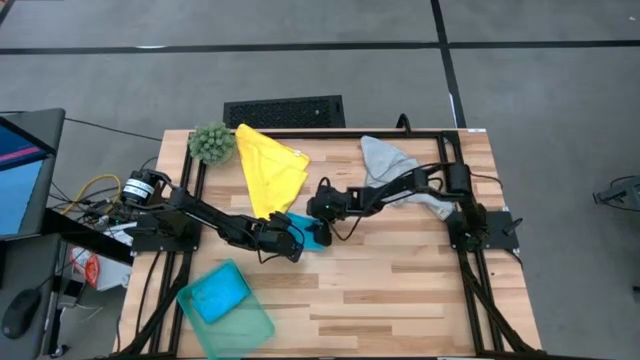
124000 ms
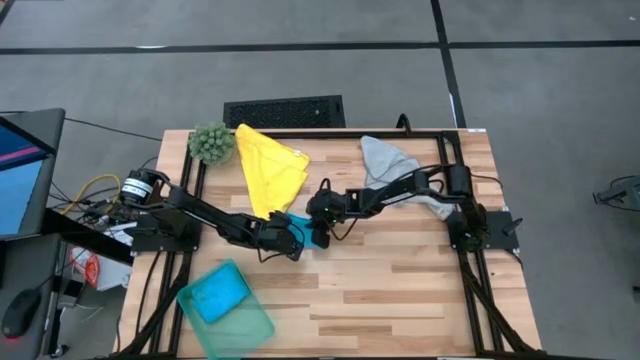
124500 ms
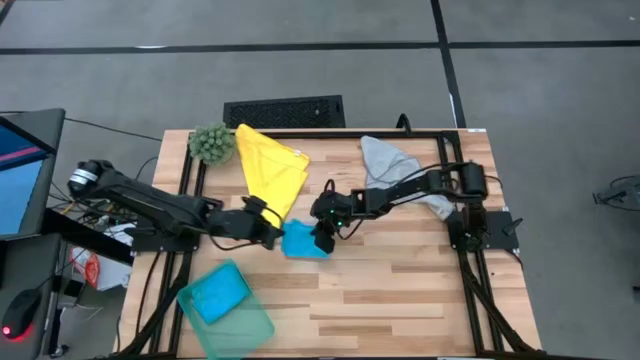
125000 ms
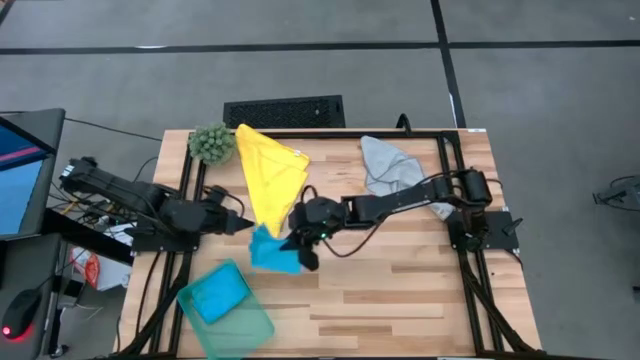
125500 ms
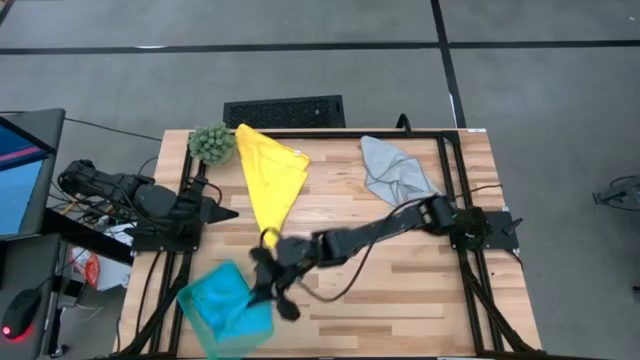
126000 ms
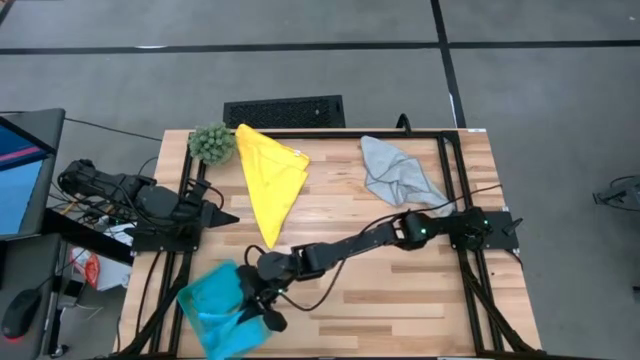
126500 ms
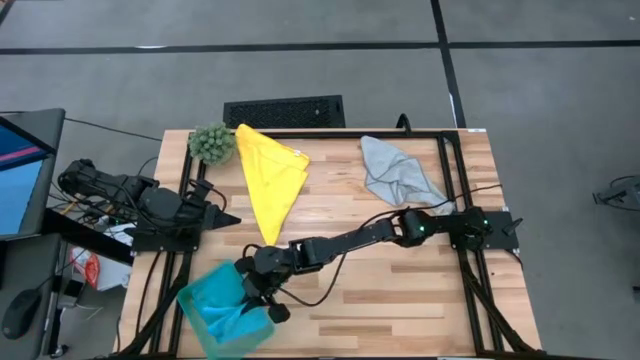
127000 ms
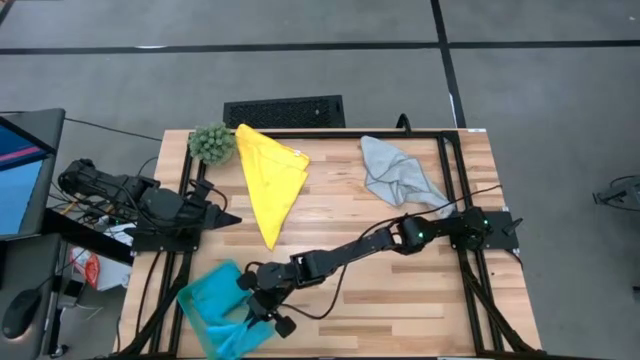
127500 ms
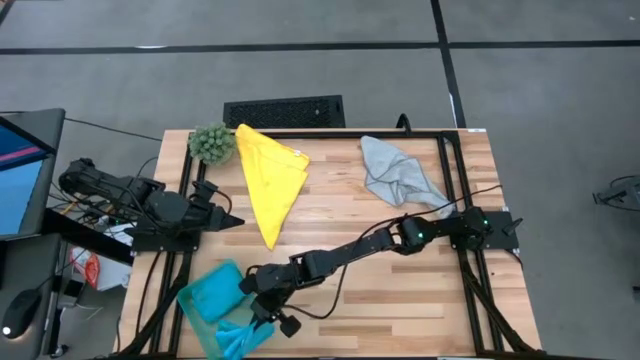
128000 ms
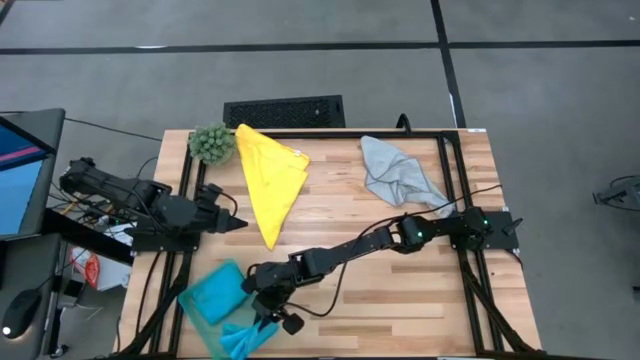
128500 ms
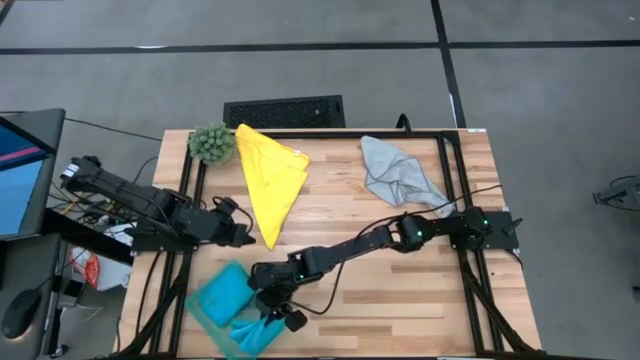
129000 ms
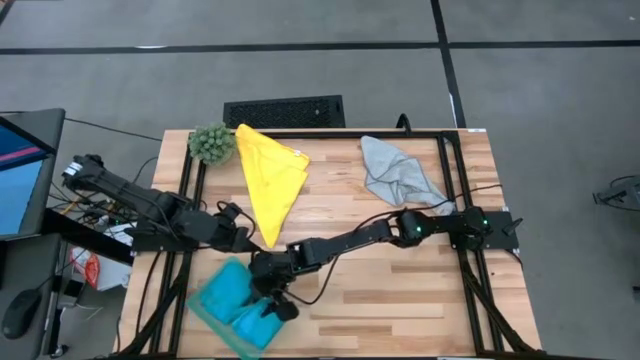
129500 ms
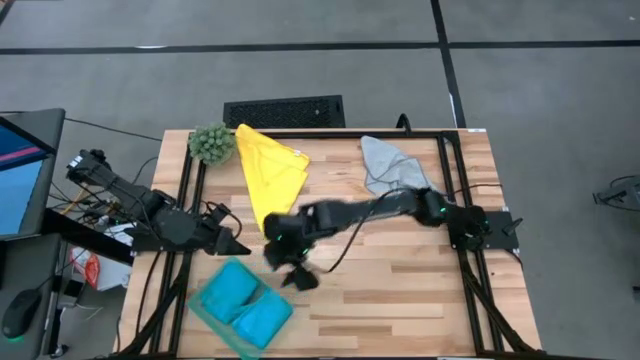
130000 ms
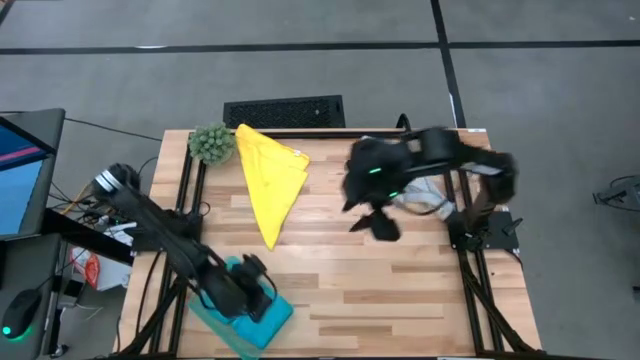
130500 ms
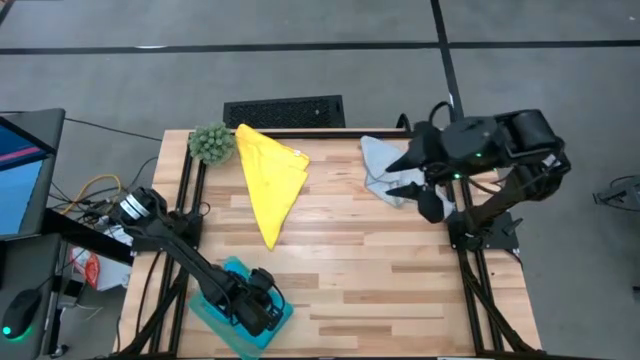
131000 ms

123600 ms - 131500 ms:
Task: Fold microfiber towels
Put the folded blue towel into the blue bin

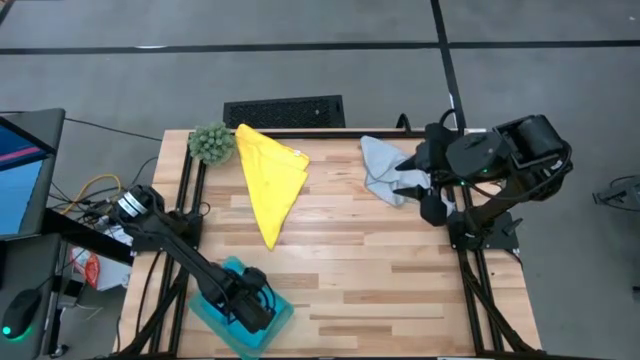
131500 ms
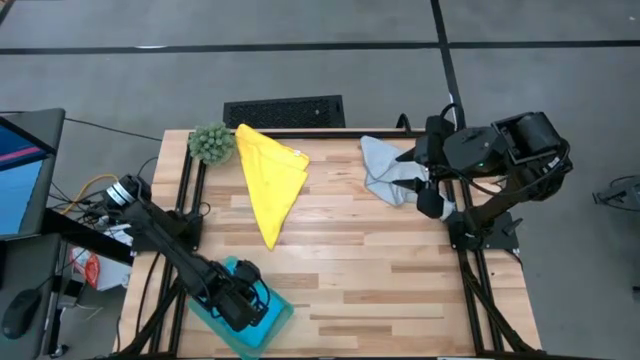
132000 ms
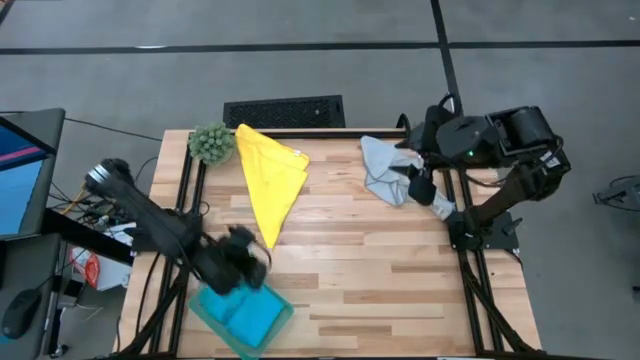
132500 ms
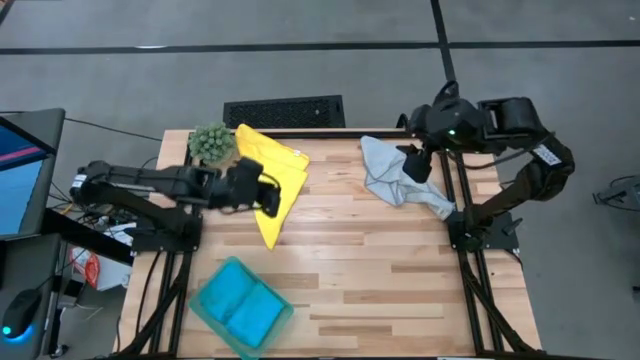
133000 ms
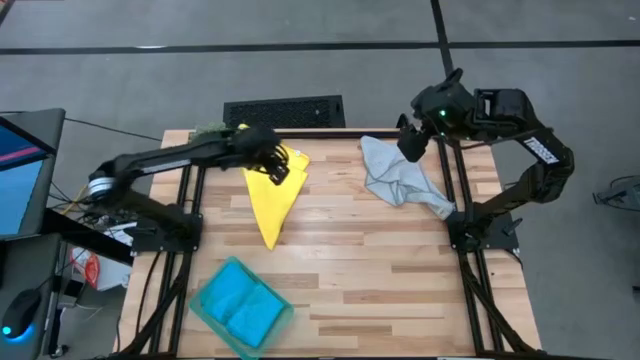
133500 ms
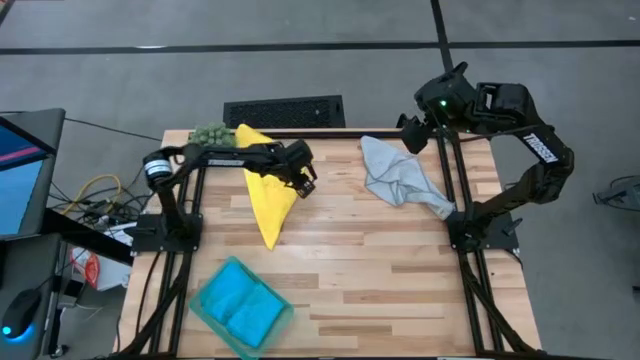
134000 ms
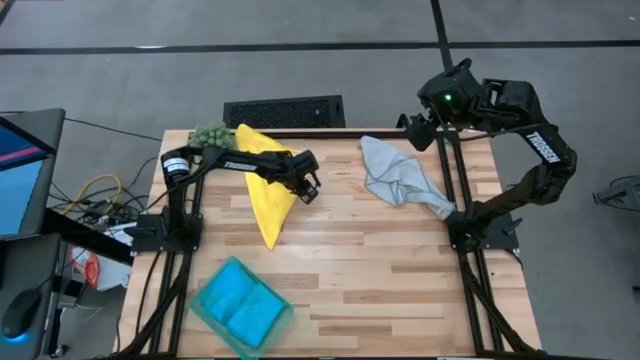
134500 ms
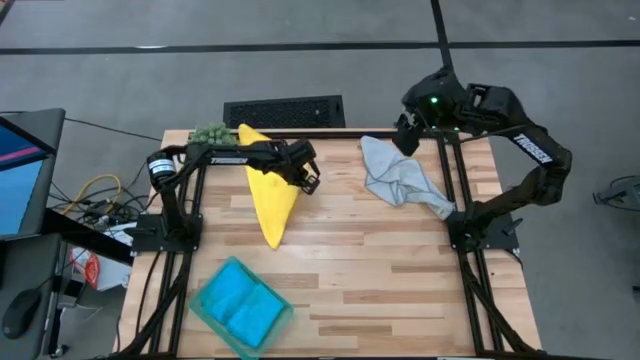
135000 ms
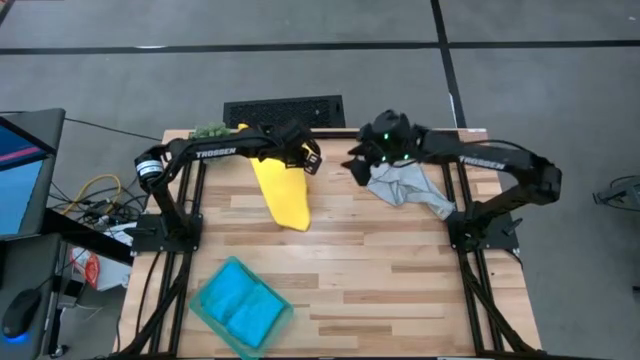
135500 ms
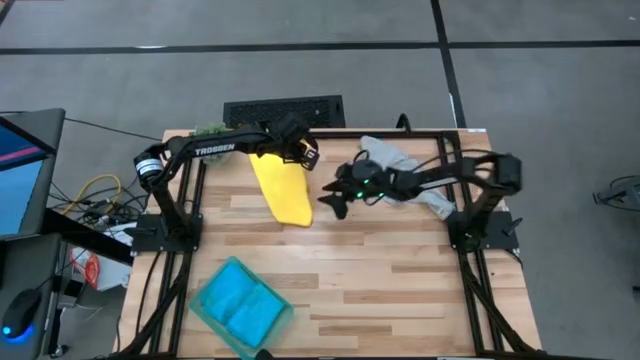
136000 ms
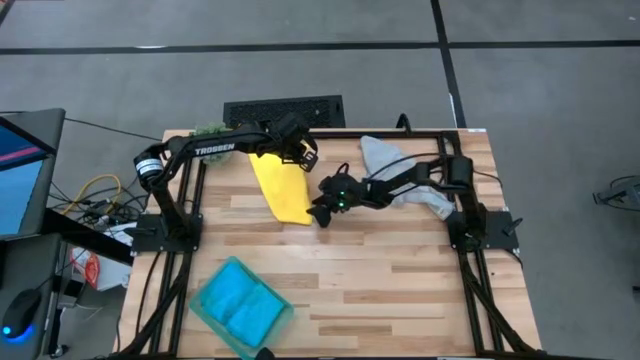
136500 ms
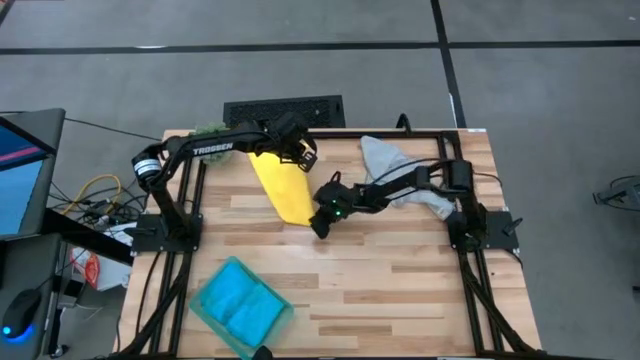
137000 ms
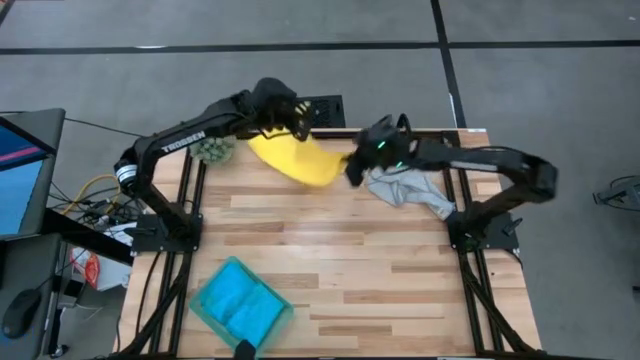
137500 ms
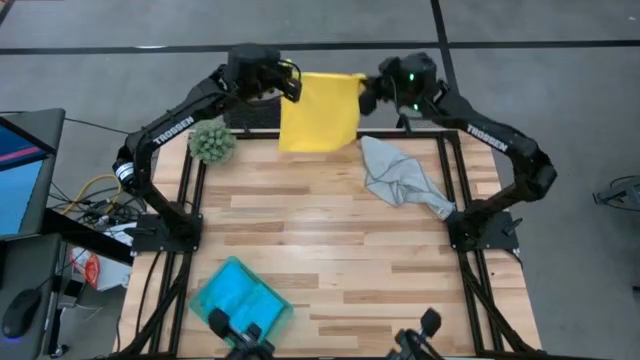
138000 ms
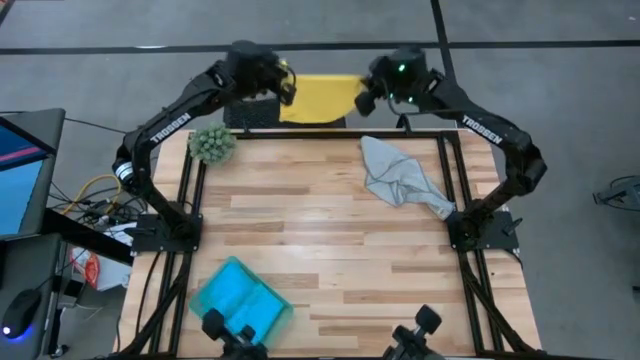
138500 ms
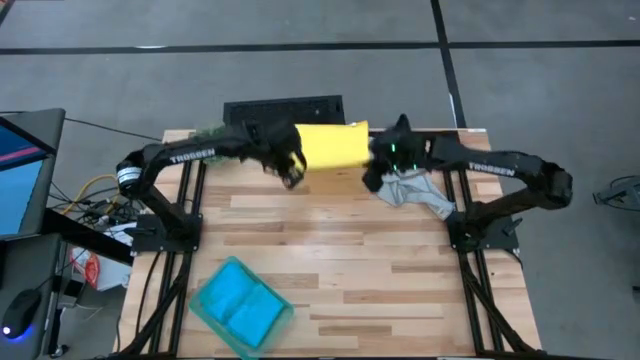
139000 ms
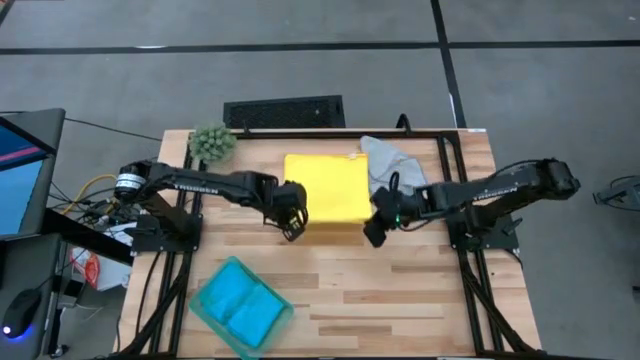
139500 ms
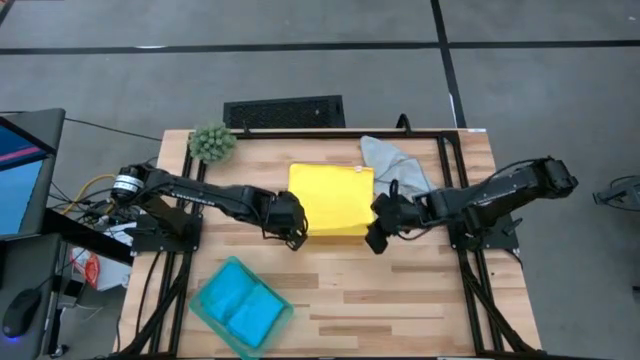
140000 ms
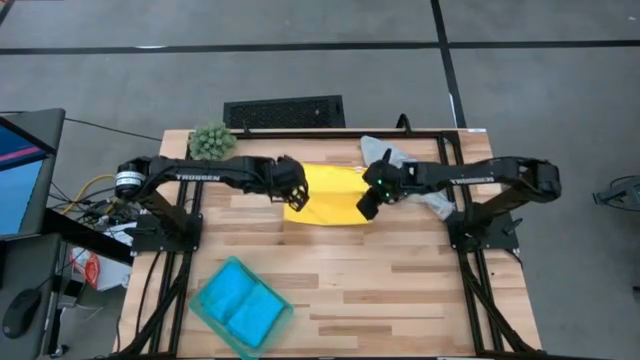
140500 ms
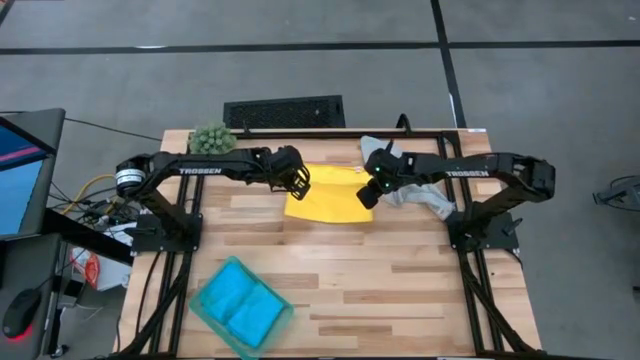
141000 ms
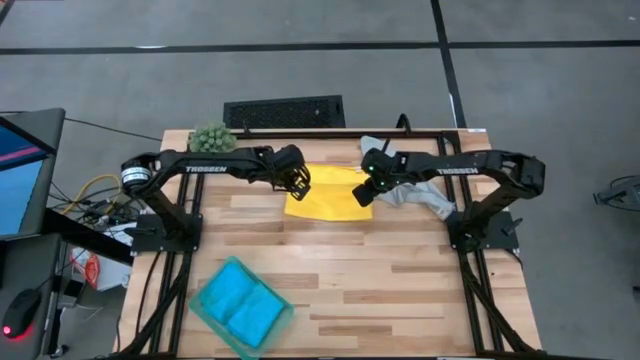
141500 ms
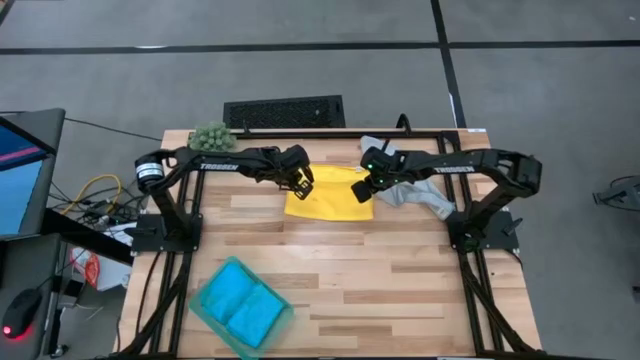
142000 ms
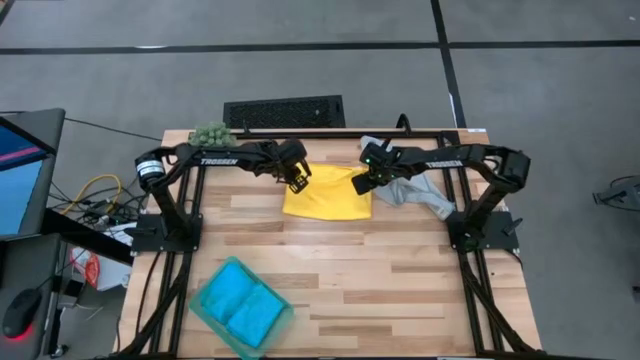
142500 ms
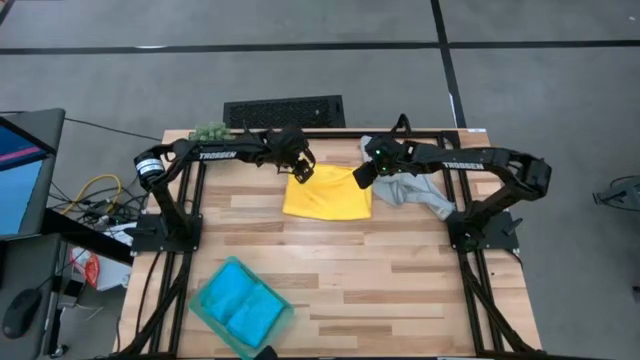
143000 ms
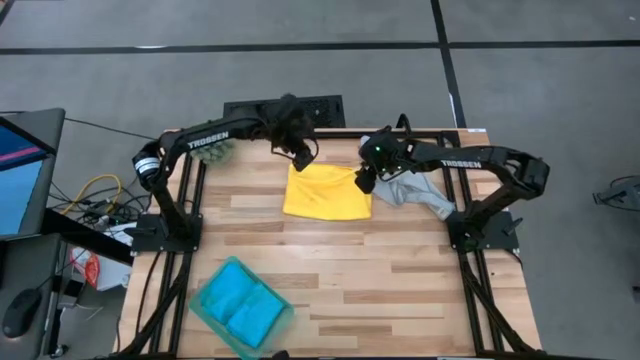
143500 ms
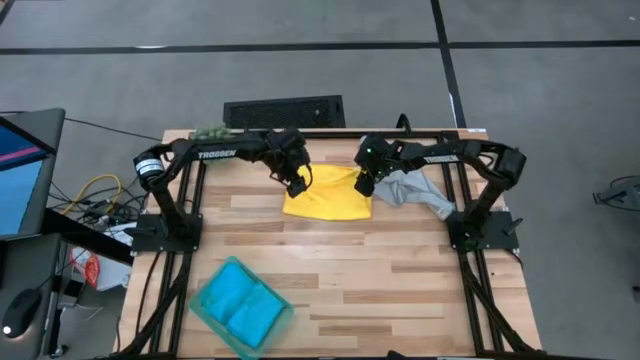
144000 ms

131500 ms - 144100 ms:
Fold the yellow towel

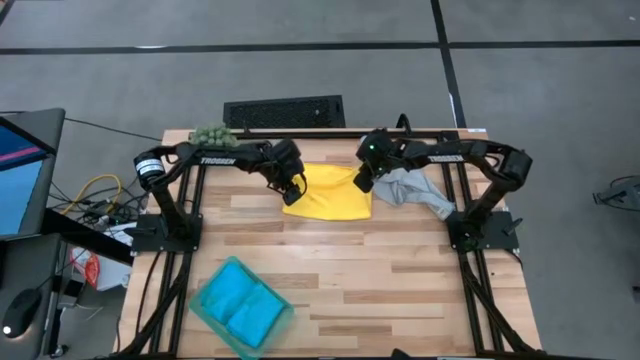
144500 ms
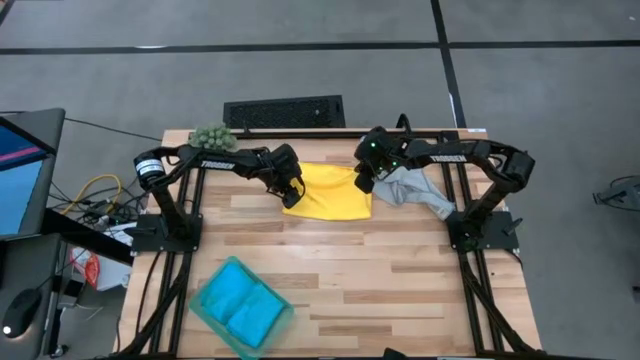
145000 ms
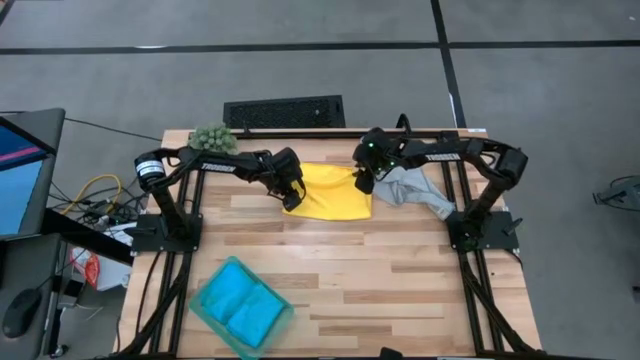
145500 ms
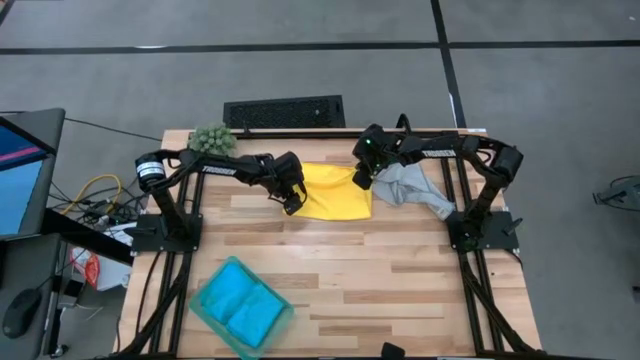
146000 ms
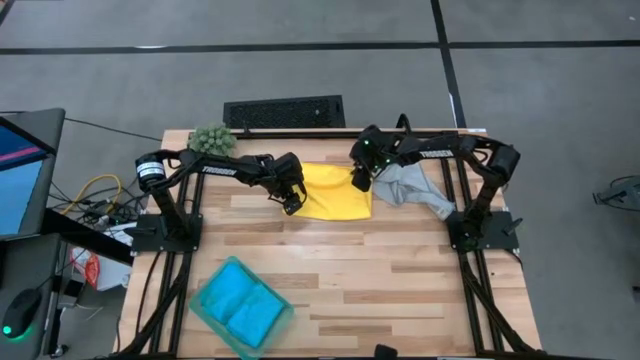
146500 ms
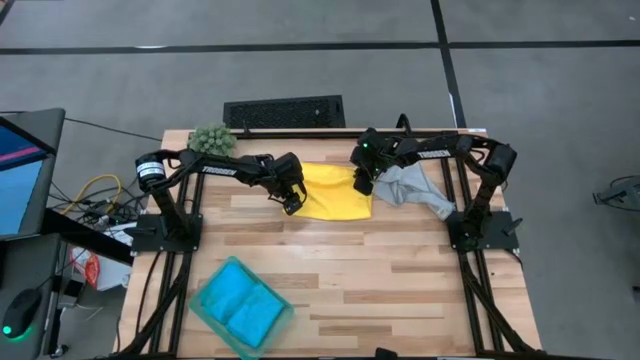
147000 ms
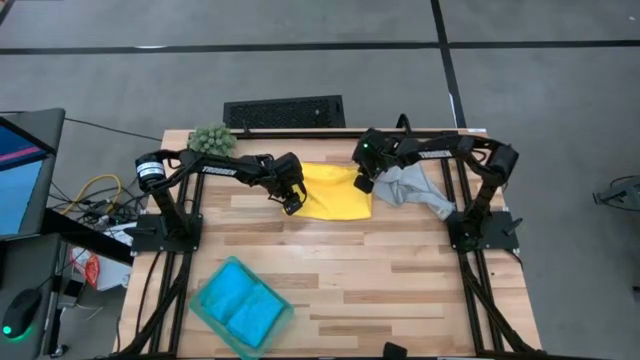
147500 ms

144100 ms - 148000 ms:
Fold the yellow towel
